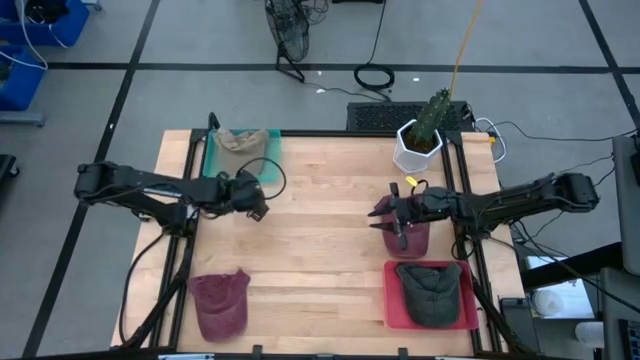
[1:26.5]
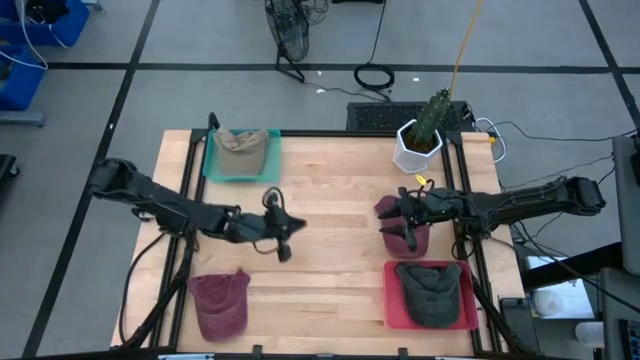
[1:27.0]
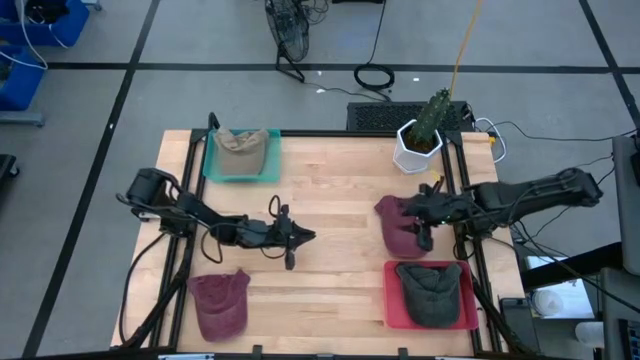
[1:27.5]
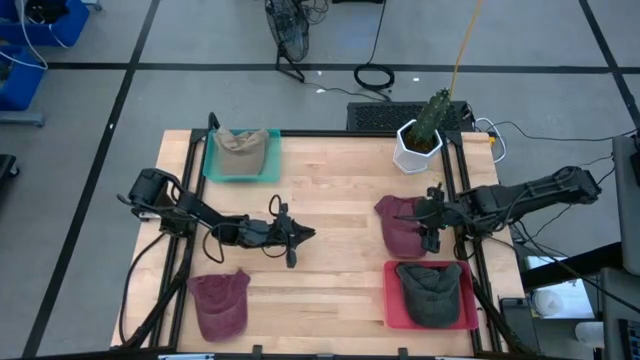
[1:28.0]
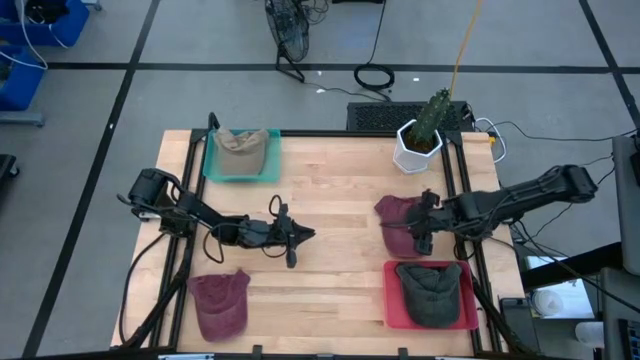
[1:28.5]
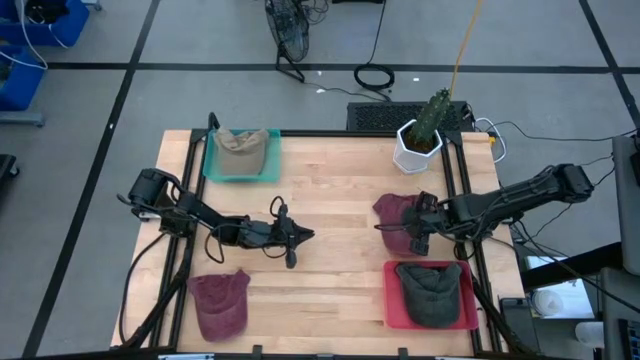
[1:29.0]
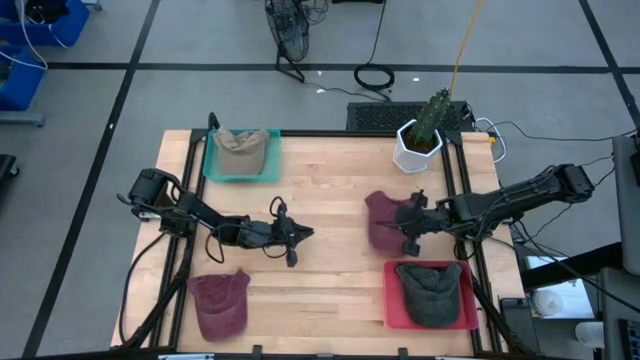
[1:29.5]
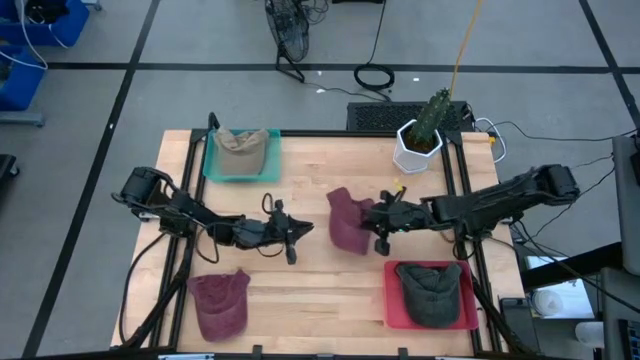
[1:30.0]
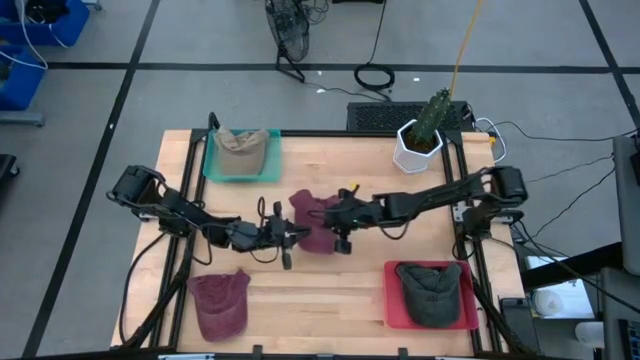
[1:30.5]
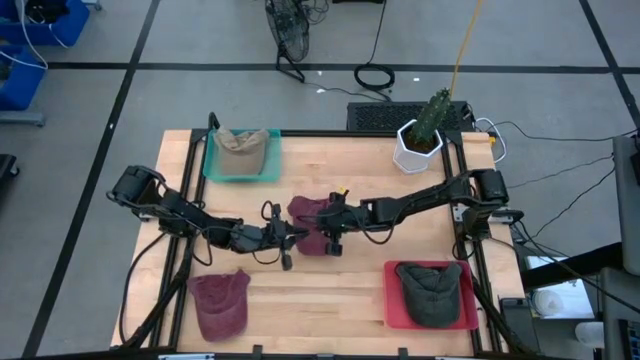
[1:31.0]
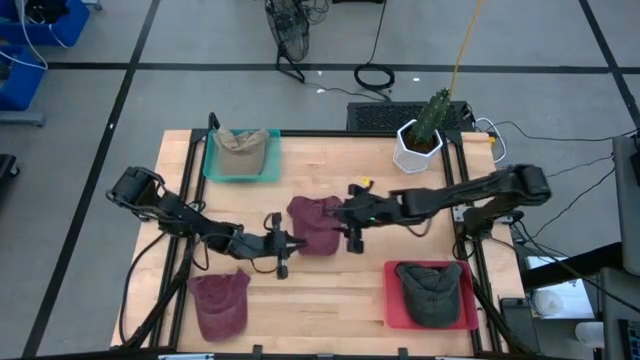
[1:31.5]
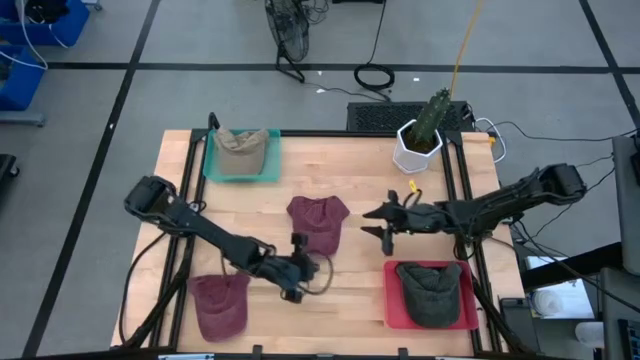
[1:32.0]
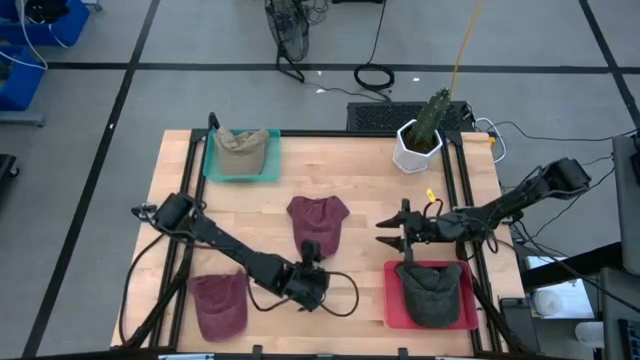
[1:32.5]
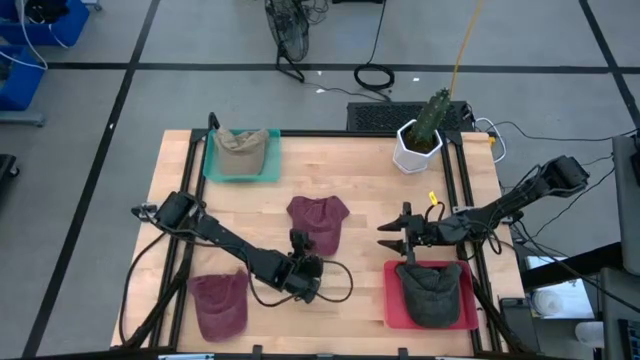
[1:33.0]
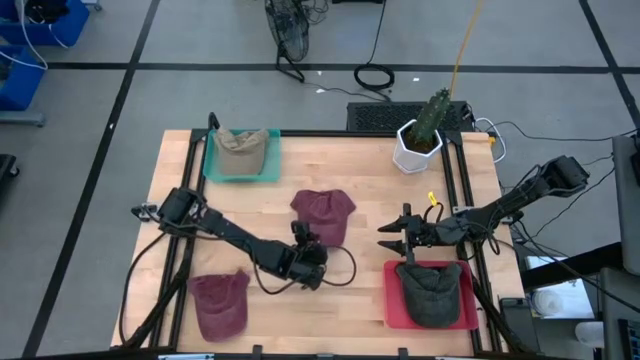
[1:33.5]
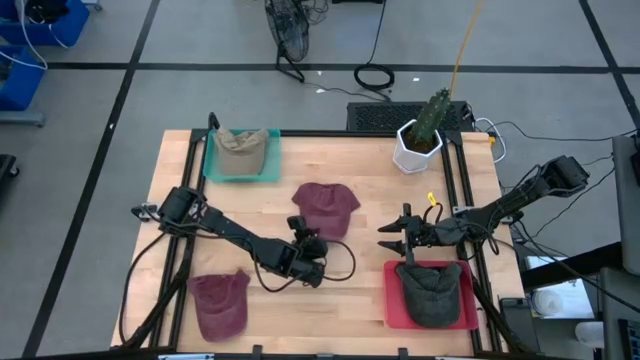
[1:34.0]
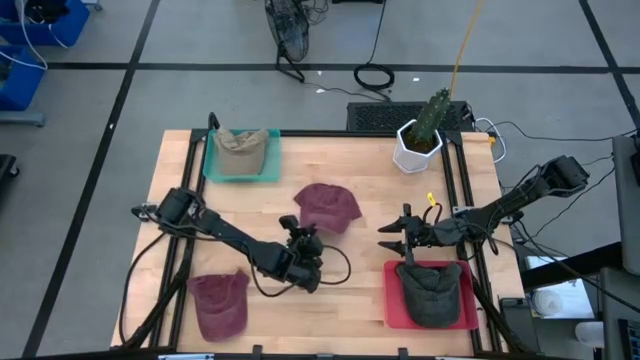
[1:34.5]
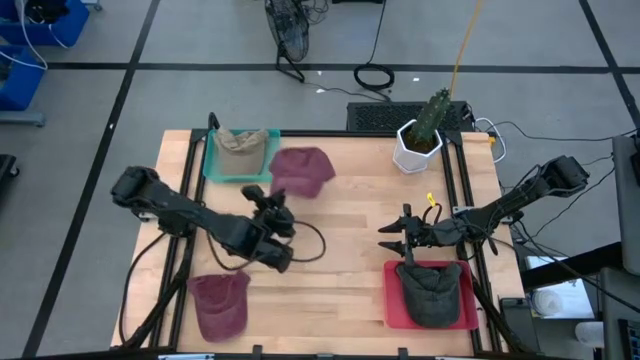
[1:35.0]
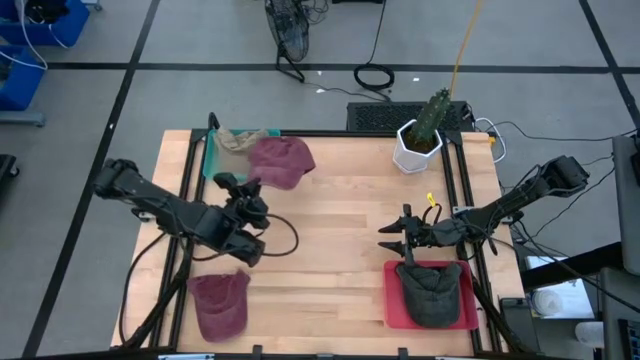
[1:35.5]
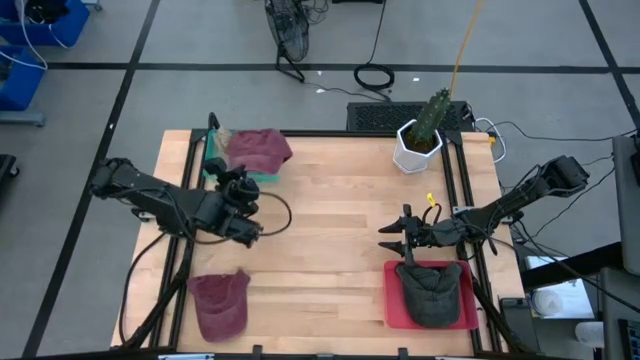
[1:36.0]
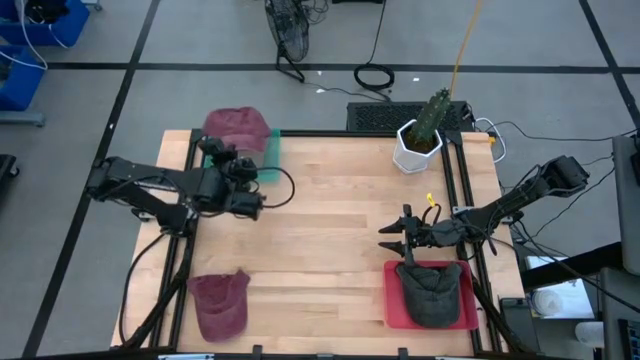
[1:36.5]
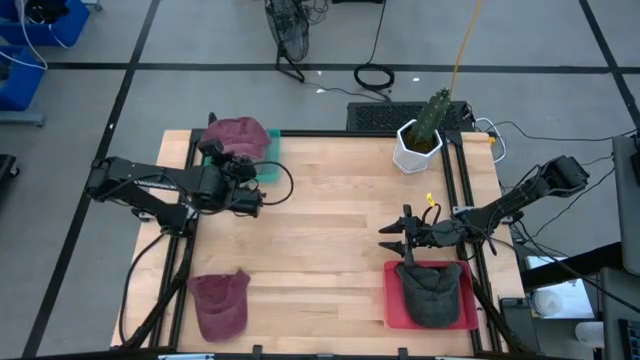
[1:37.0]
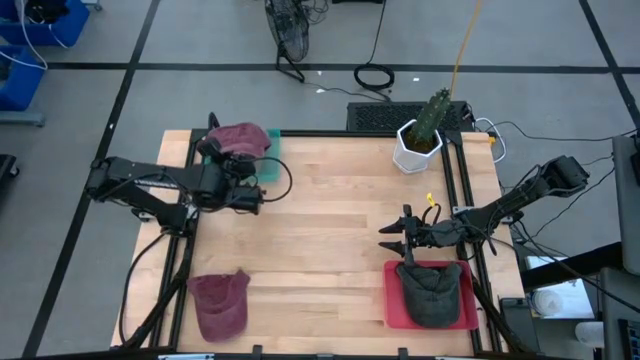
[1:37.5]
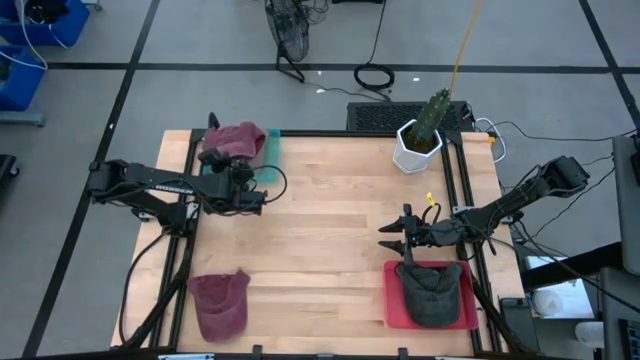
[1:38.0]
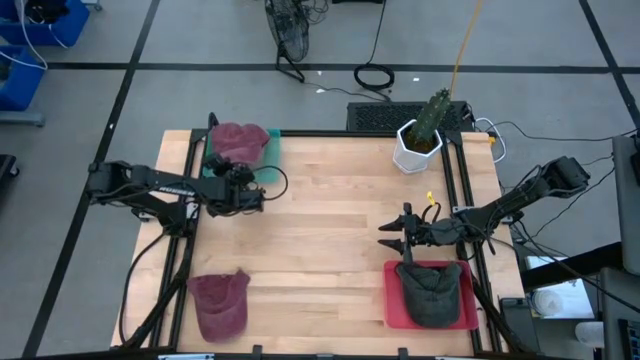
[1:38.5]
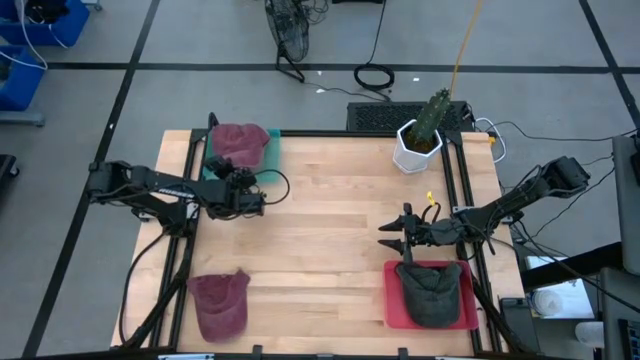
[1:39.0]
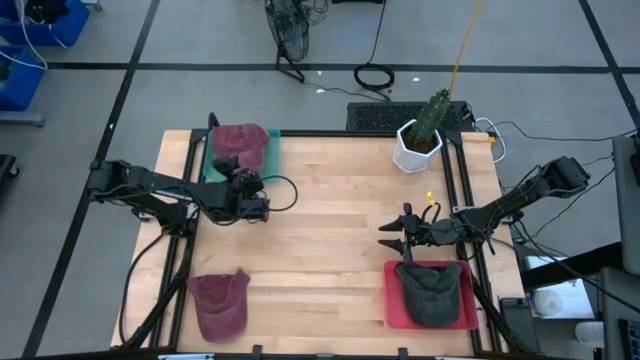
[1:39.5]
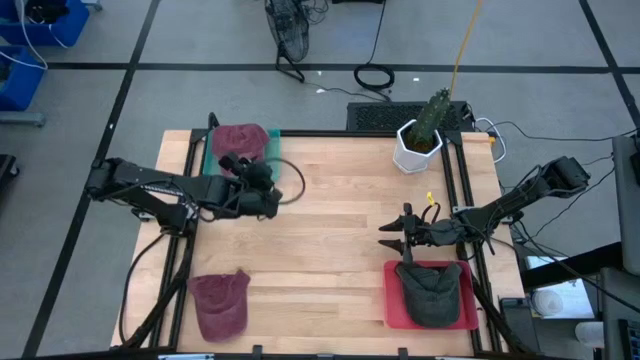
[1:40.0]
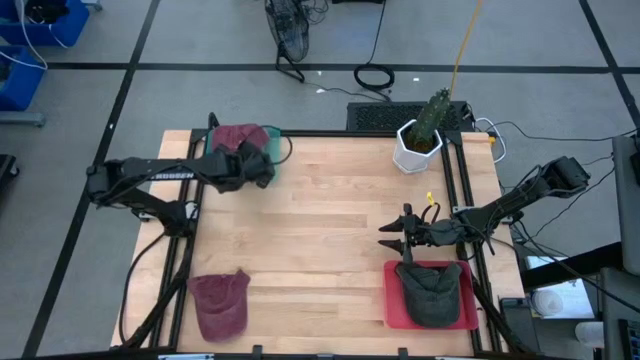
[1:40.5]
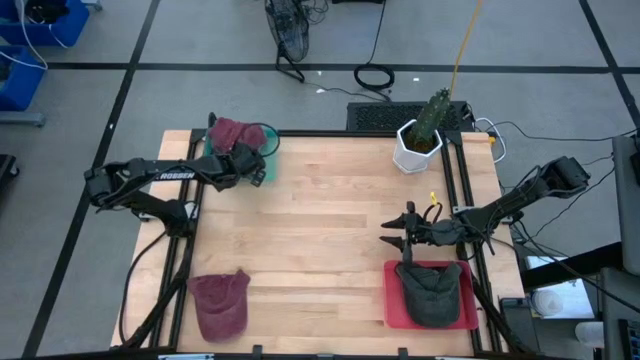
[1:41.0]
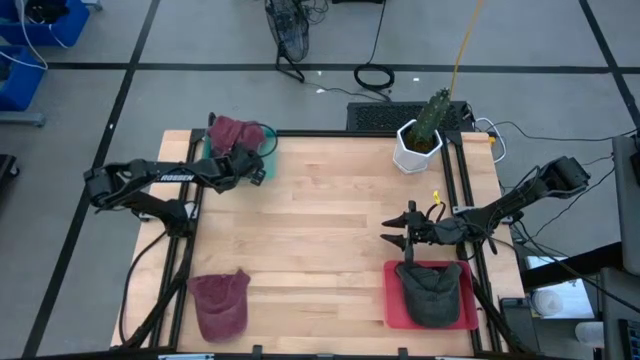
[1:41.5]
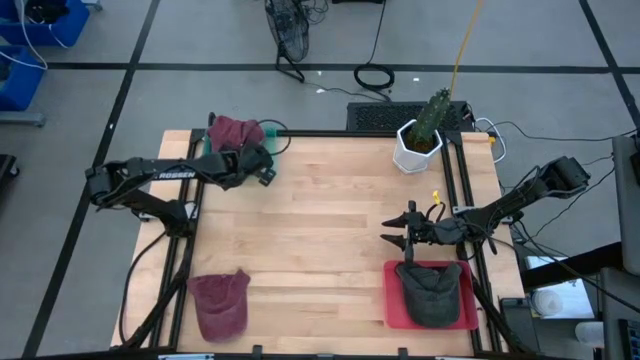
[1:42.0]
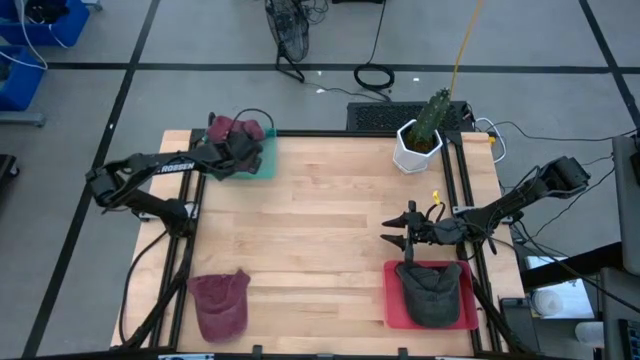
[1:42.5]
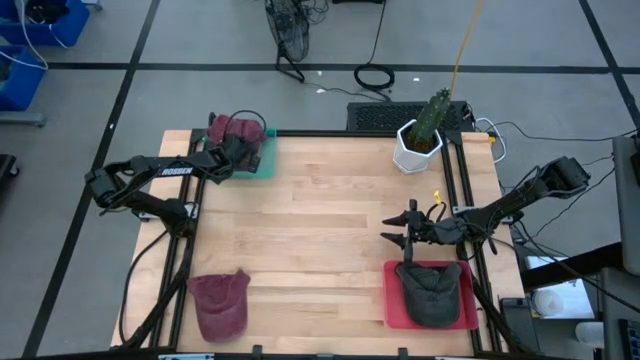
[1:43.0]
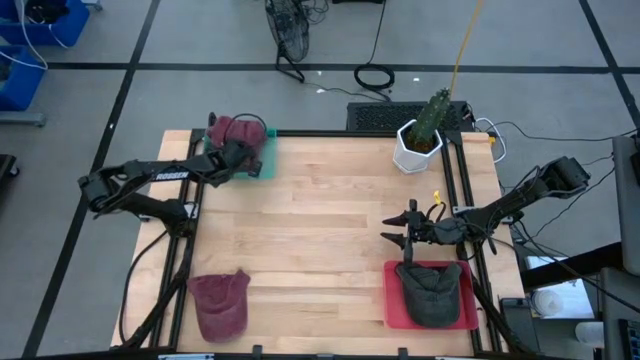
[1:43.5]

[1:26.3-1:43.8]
Task: Pick & Place hat
Put the right maroon cap into the green bin

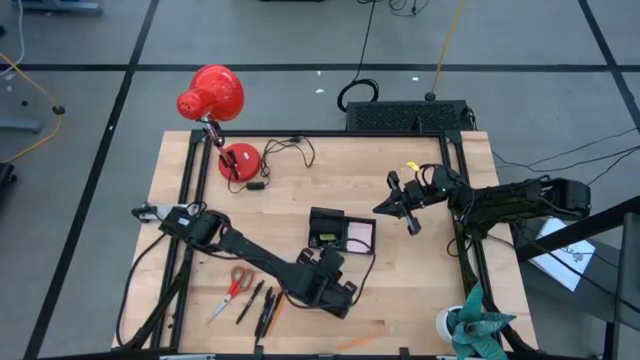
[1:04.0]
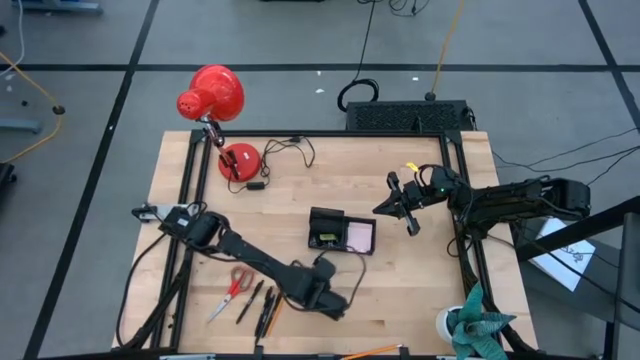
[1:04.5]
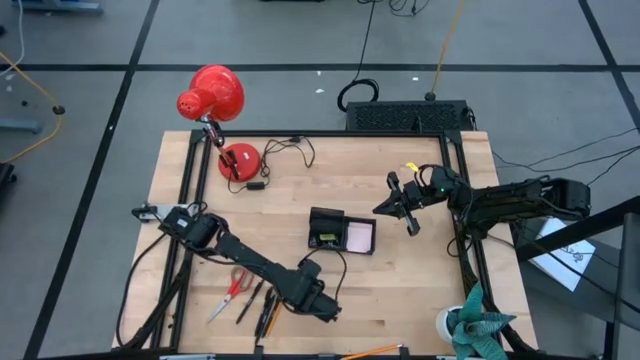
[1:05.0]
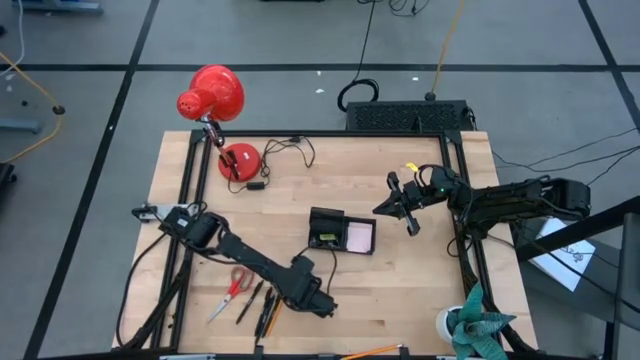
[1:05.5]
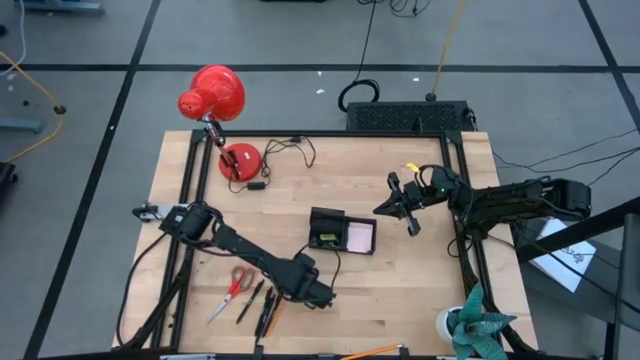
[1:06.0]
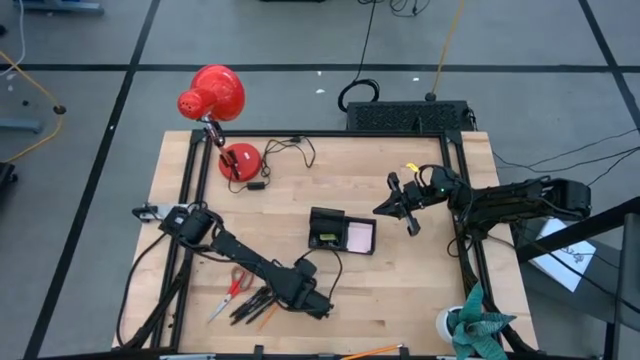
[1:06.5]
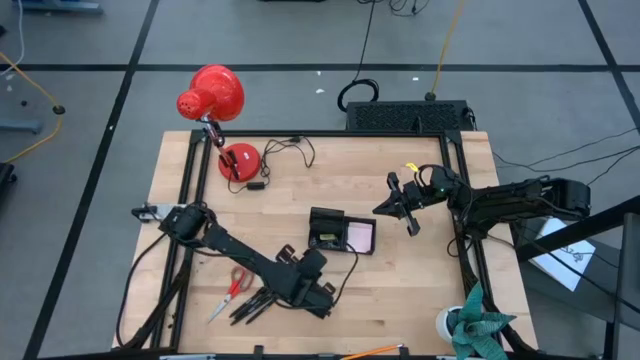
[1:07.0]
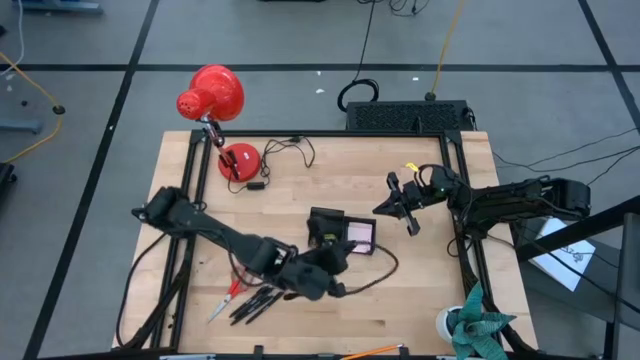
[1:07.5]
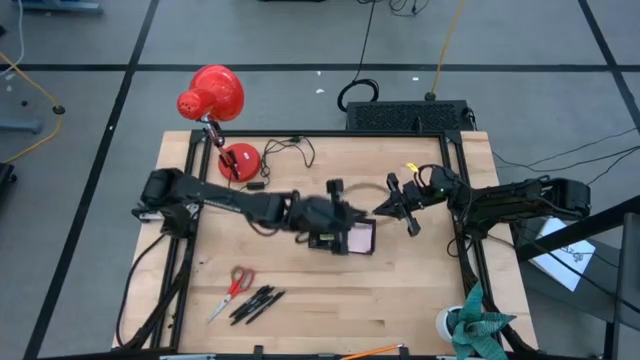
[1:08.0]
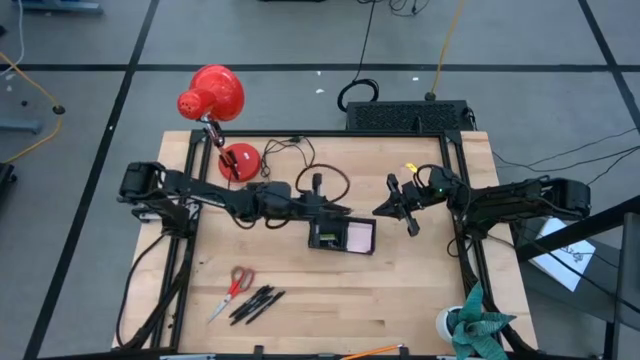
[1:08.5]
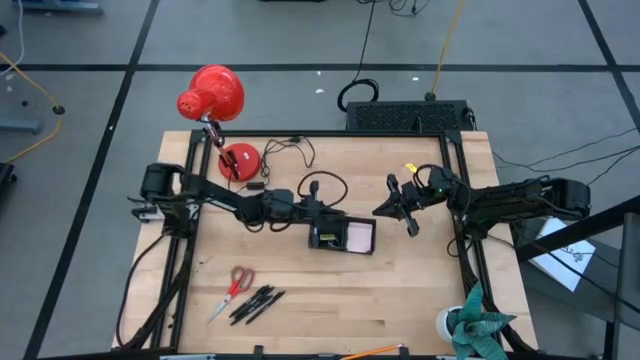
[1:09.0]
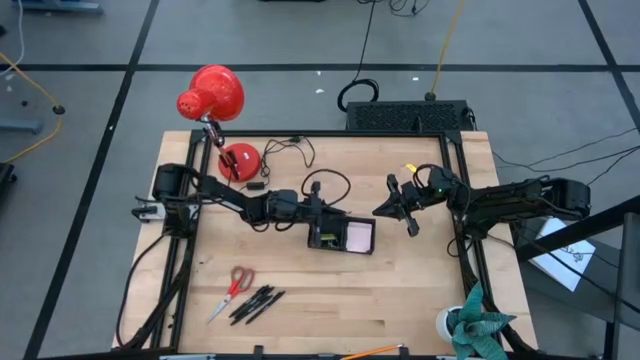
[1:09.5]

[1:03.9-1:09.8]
Task: Pick and place office supplies into organizer
Put the orange pencil into the black desk organizer
